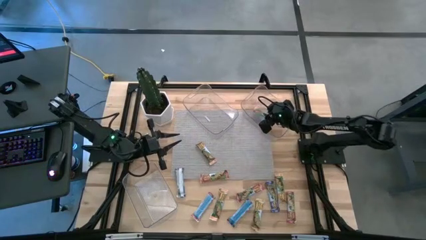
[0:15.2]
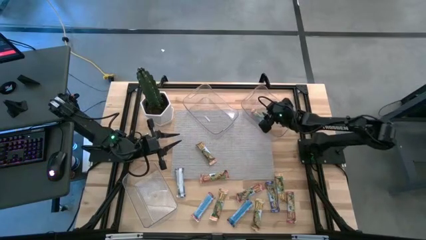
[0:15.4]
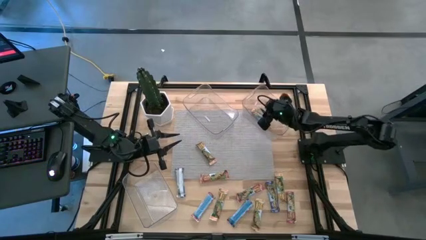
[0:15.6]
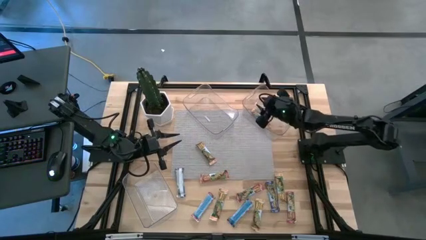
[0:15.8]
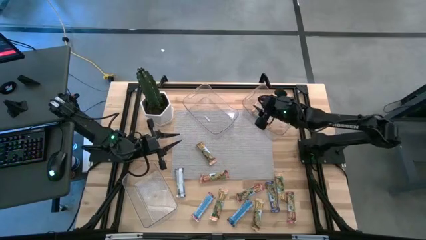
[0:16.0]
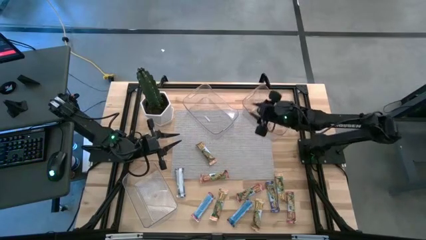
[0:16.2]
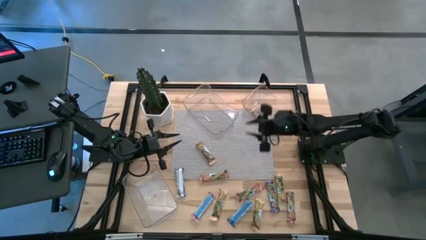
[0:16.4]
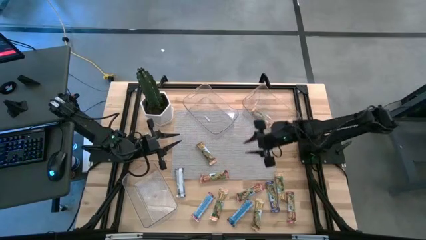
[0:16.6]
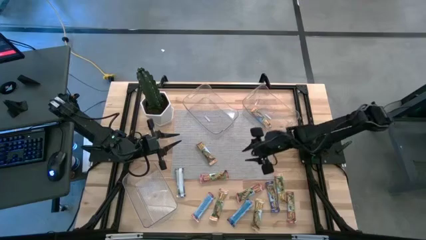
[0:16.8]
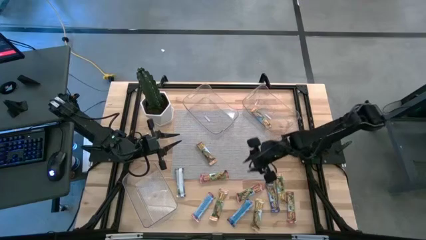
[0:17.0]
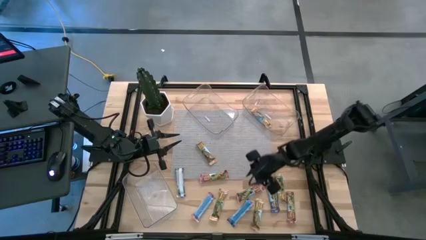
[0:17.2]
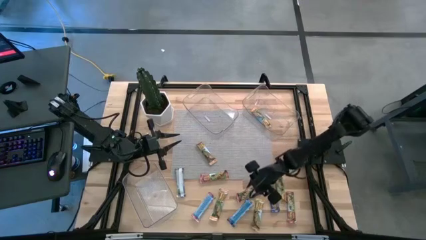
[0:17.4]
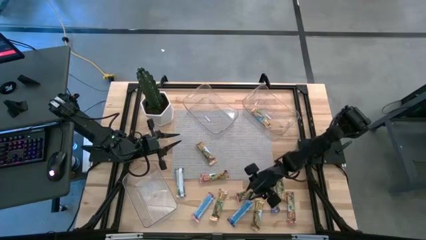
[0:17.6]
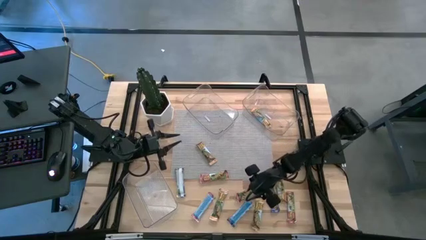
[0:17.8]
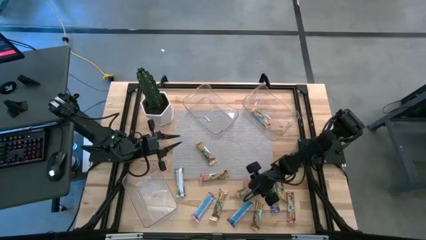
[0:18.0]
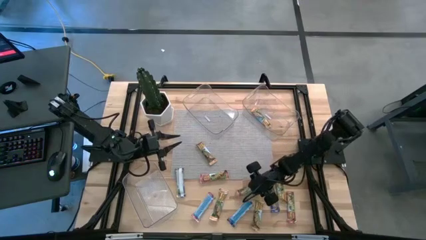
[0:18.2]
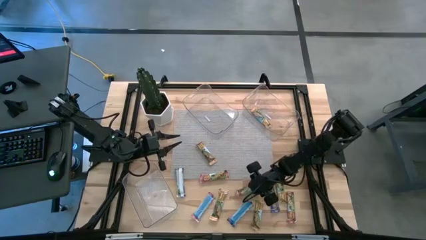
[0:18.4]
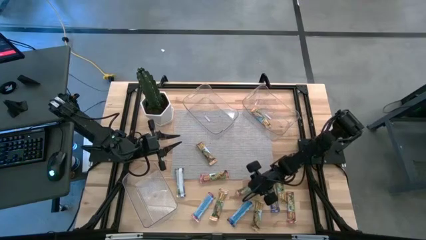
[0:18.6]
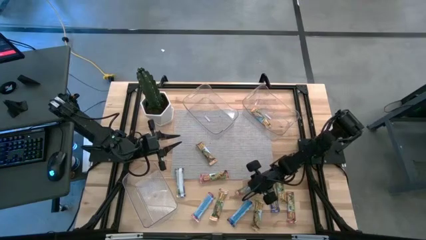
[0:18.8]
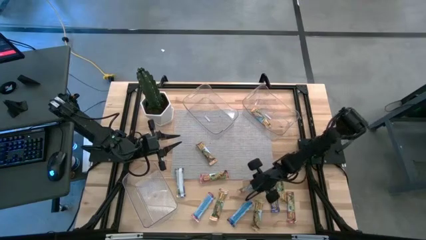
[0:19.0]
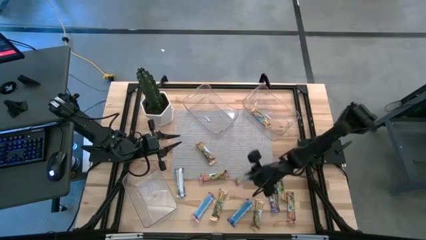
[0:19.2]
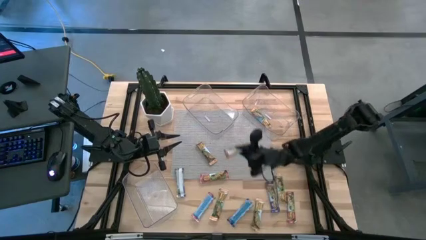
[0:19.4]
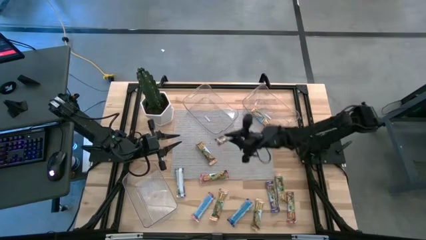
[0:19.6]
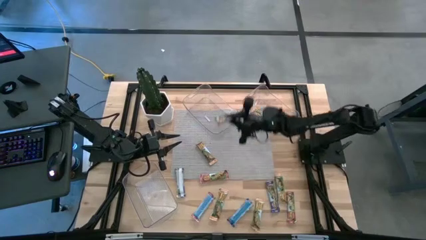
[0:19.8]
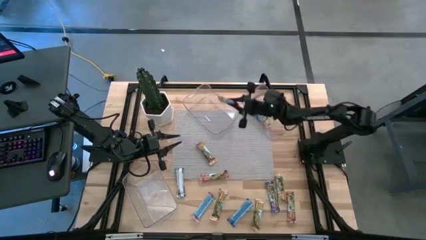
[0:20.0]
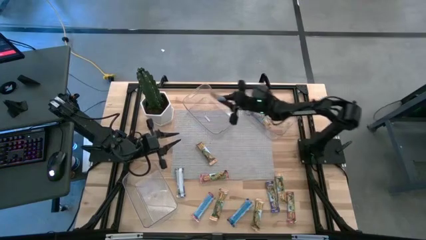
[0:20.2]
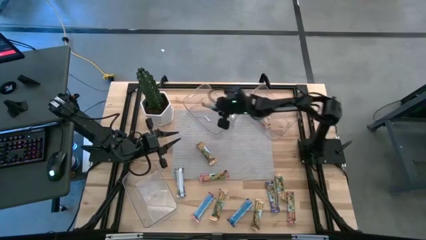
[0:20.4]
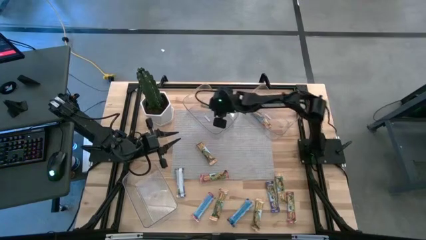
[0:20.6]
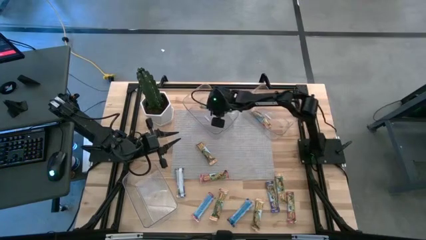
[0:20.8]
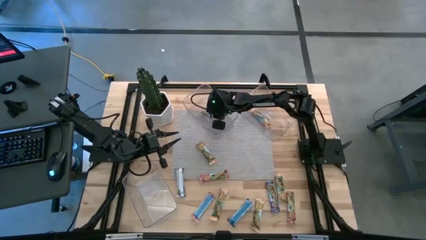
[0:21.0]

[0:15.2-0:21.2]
Task: Pick and place Granola Bars by type
Put the red granola bar into the top left transparent bin

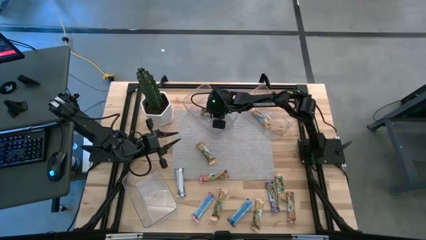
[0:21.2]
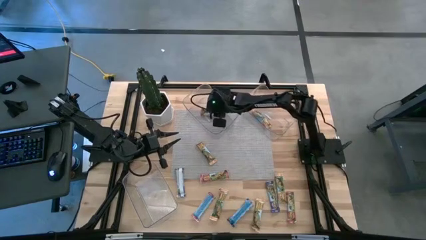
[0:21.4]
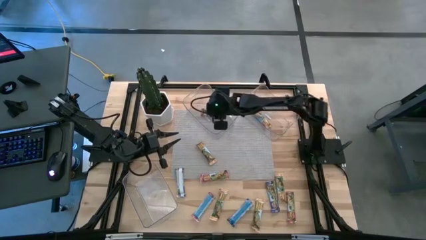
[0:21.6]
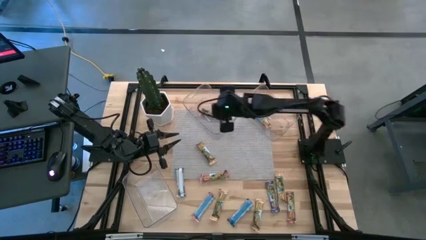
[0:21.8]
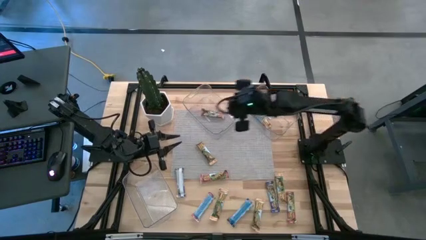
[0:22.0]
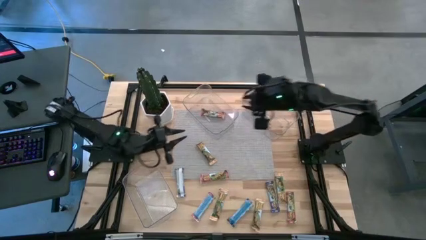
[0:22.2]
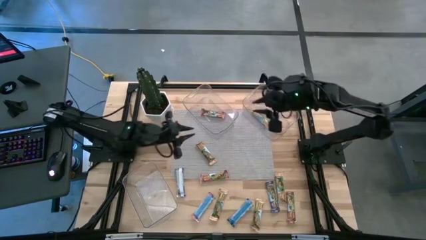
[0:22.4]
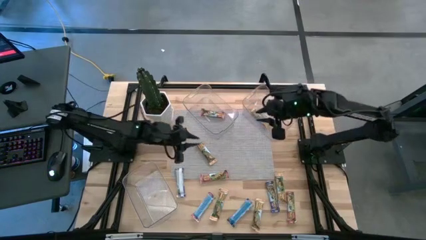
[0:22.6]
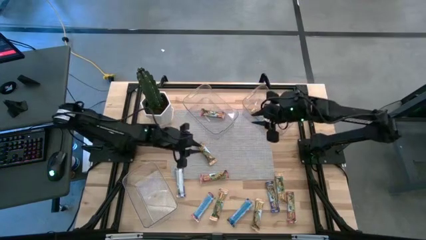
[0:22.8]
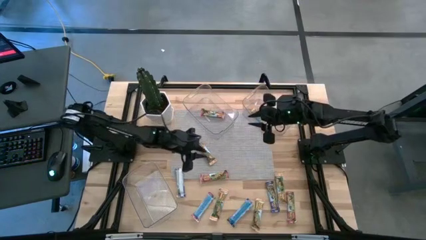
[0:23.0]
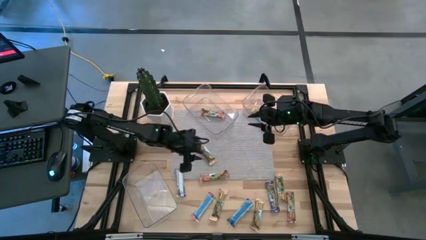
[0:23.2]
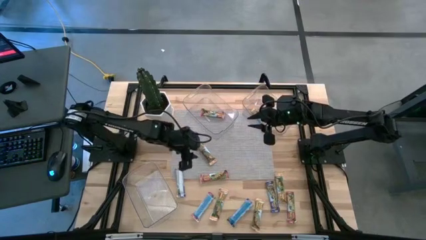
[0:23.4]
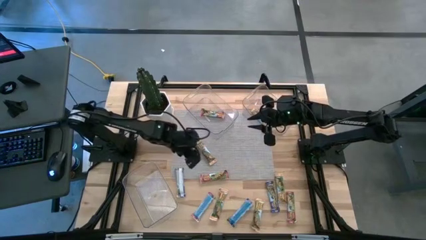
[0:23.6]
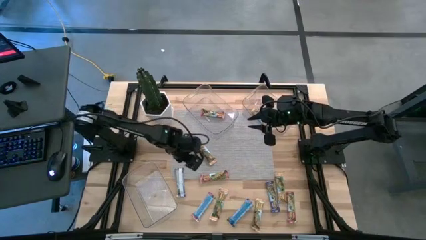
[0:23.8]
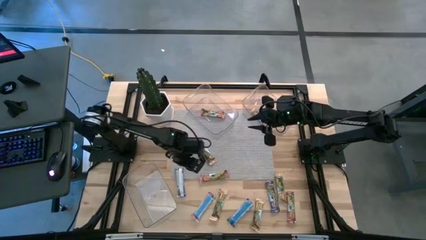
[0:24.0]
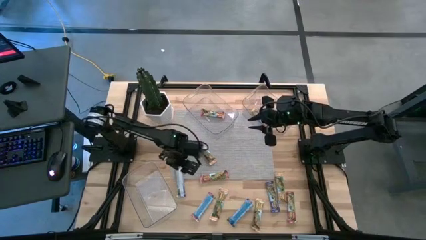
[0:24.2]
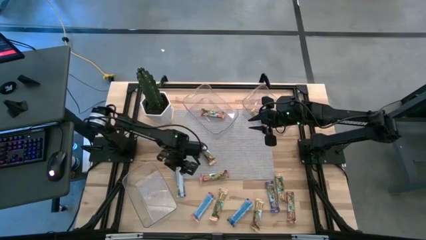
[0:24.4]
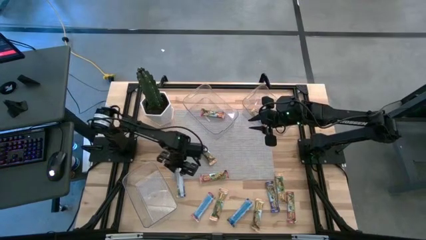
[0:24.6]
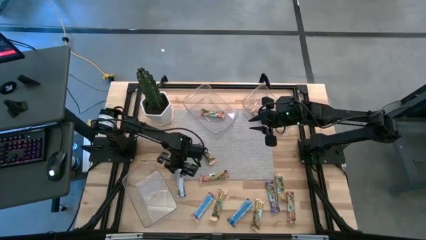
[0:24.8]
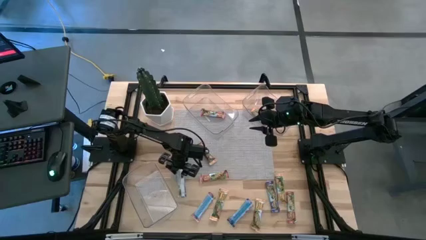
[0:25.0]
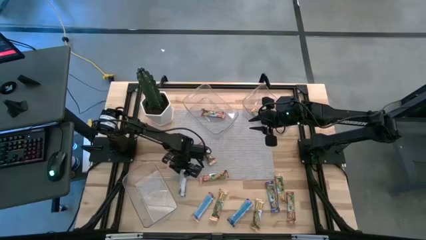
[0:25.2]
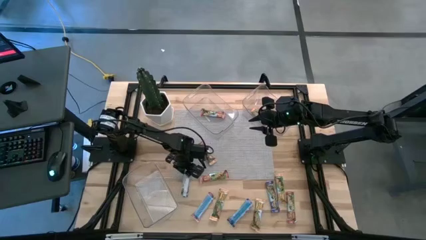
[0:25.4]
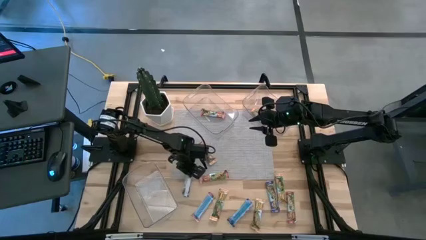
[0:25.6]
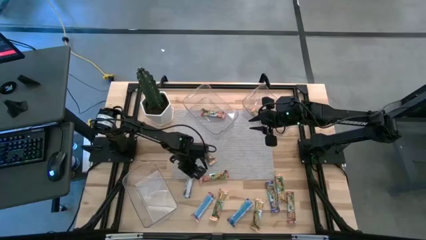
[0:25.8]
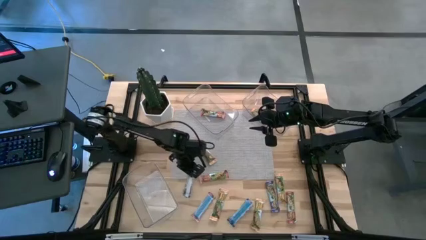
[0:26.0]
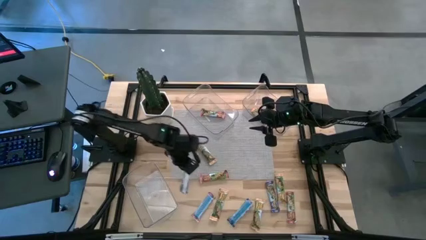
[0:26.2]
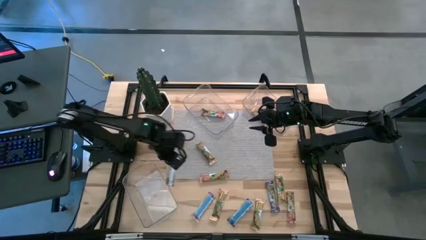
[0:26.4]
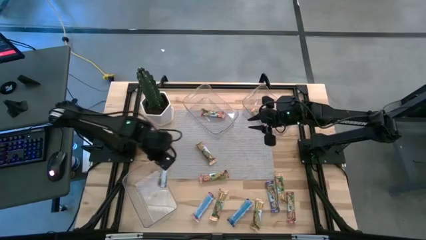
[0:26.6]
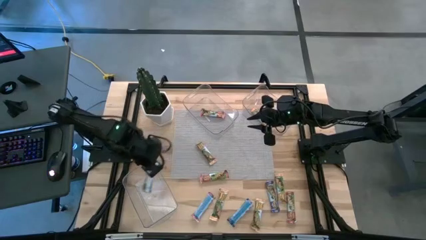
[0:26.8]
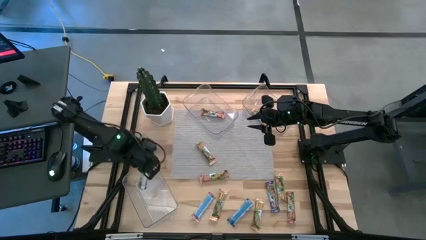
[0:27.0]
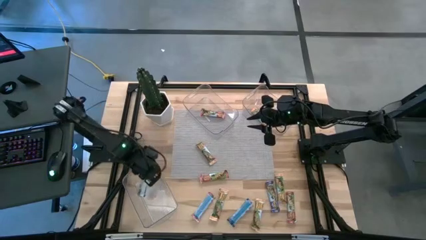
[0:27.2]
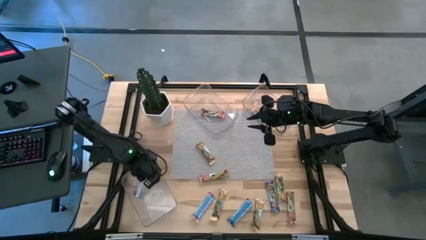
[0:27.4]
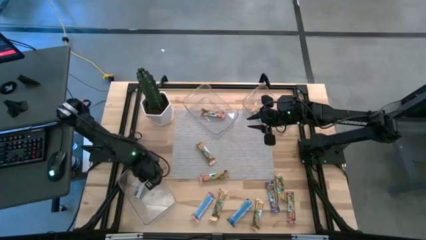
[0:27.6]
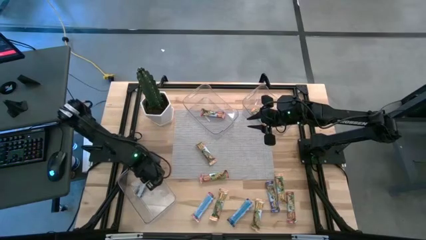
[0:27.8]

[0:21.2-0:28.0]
Put the blue granola bar into the bottom transparent bin

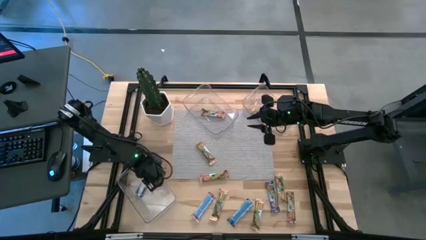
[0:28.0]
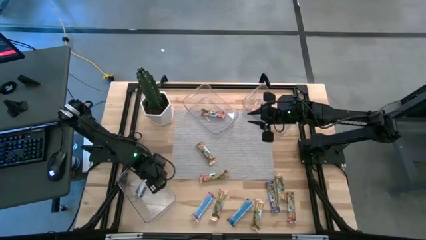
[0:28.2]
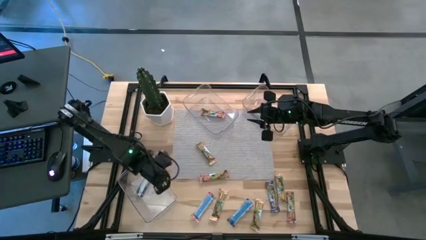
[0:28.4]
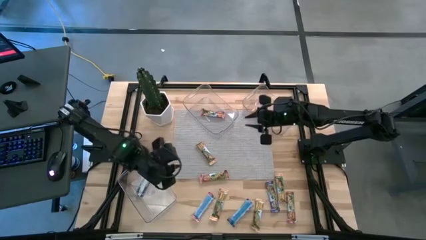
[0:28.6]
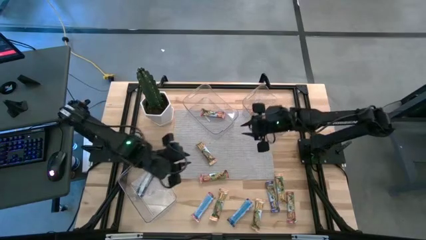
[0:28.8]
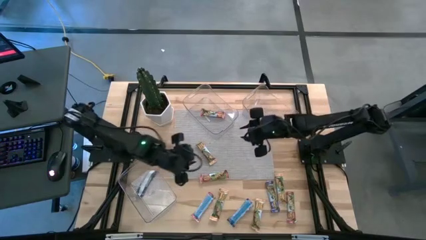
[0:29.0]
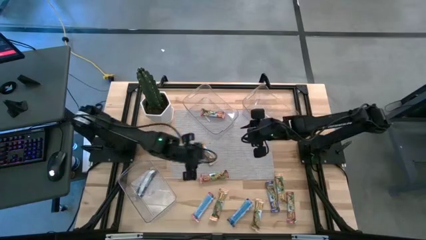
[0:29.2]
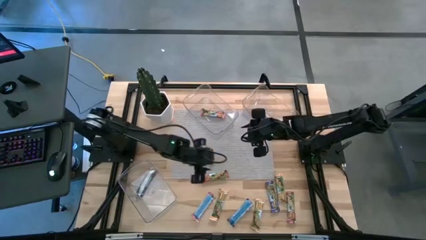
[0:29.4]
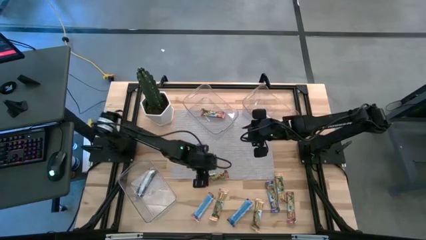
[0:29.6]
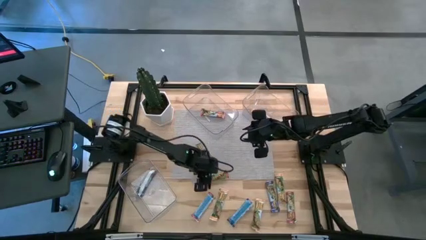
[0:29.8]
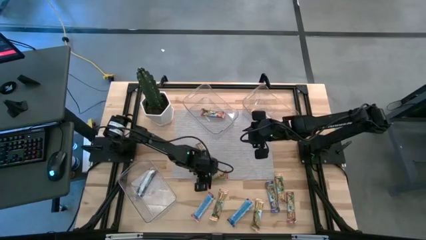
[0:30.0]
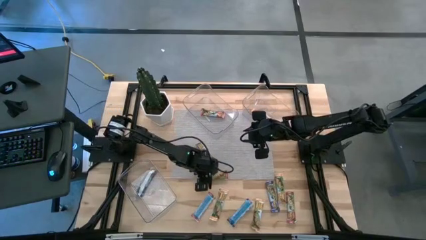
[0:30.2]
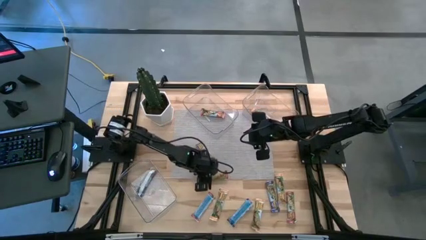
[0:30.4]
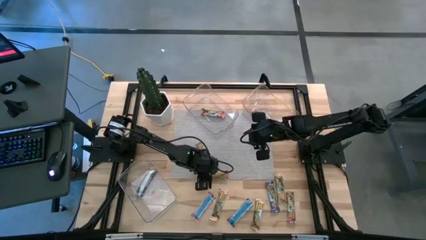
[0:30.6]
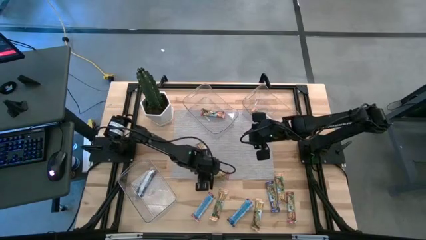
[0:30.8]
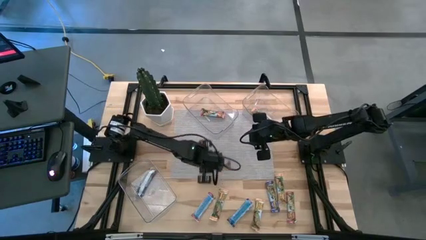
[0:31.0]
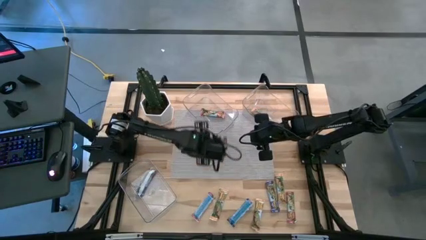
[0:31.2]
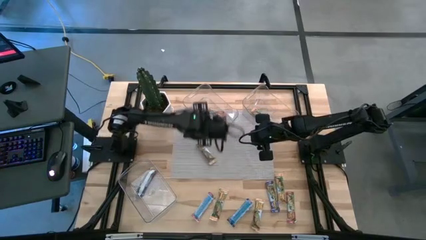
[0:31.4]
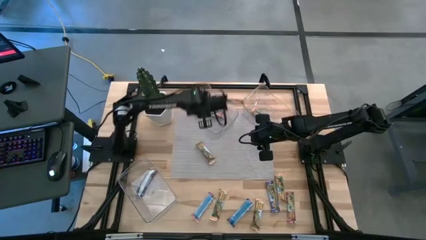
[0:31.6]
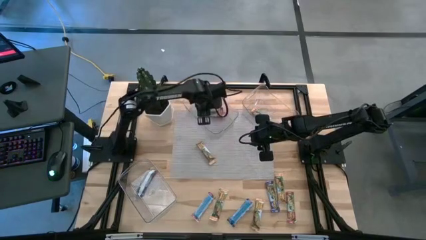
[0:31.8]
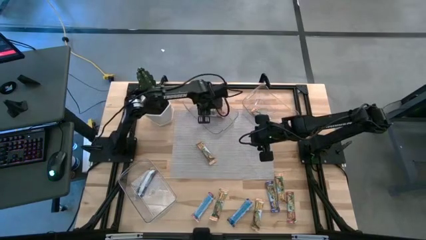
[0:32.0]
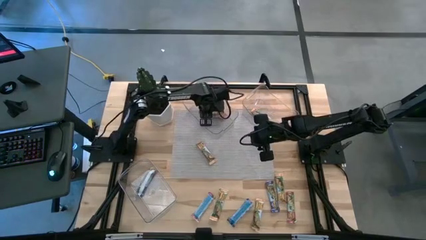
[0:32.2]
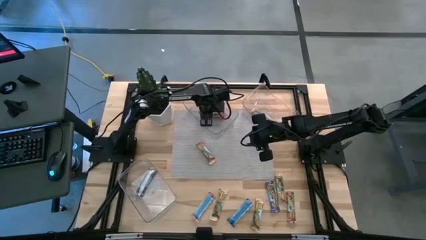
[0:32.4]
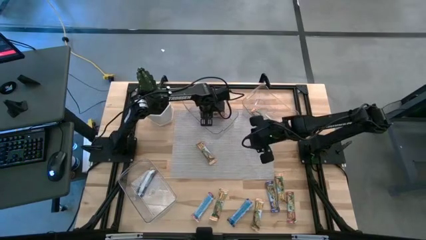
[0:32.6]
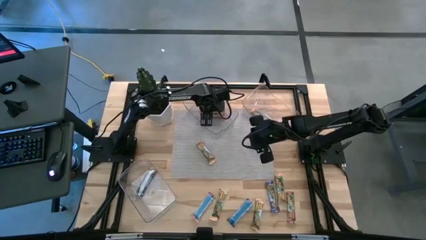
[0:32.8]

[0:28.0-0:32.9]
Put the red granola bar into the top left transparent bin
